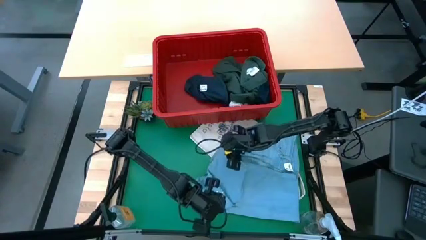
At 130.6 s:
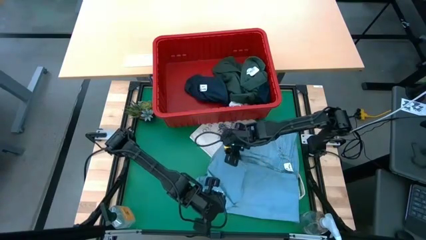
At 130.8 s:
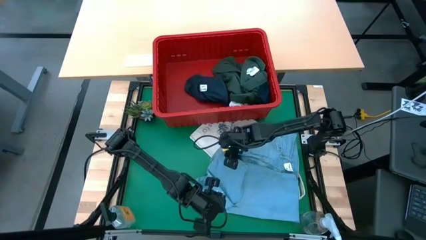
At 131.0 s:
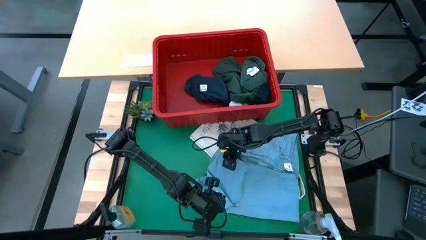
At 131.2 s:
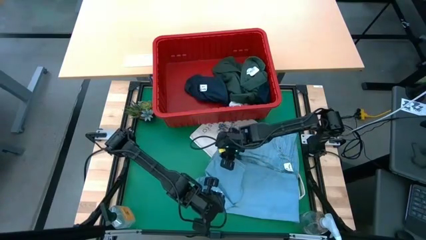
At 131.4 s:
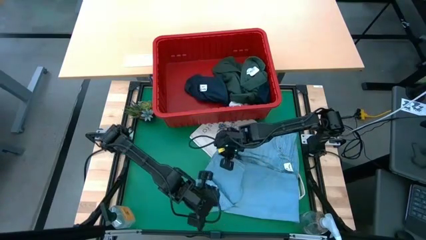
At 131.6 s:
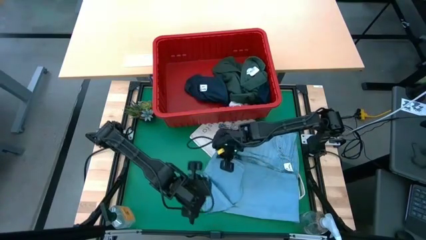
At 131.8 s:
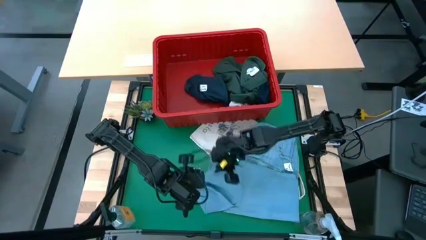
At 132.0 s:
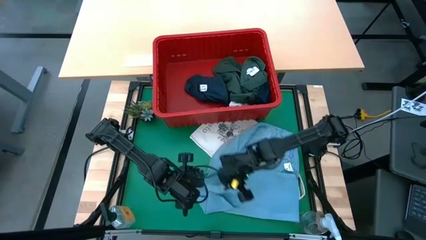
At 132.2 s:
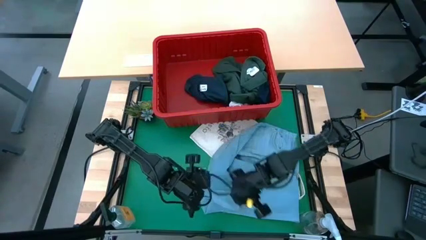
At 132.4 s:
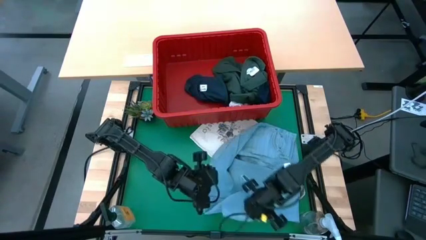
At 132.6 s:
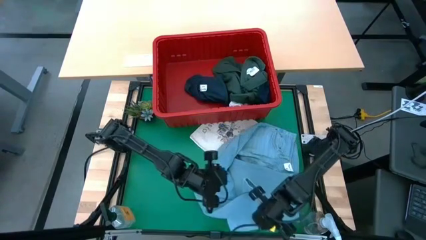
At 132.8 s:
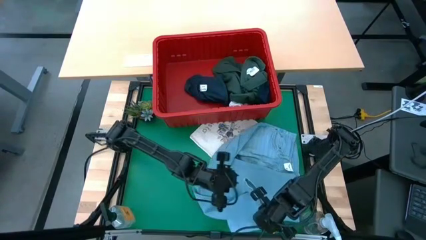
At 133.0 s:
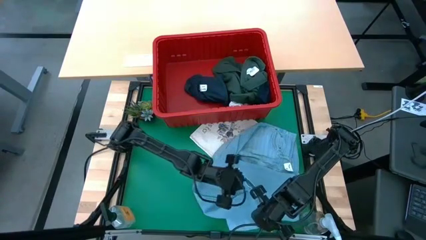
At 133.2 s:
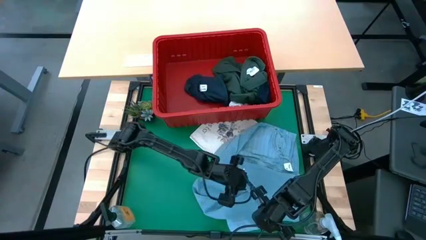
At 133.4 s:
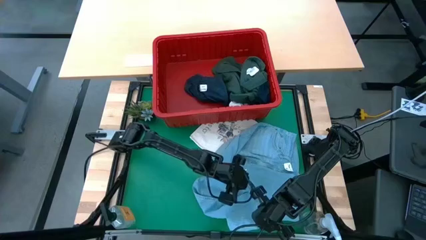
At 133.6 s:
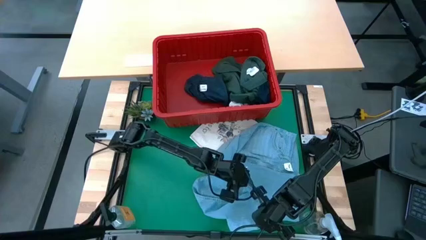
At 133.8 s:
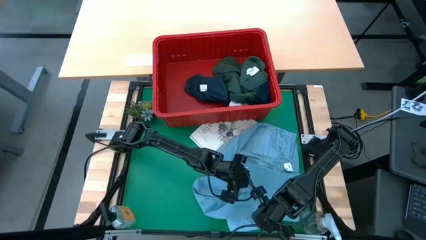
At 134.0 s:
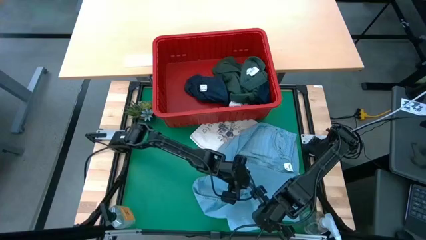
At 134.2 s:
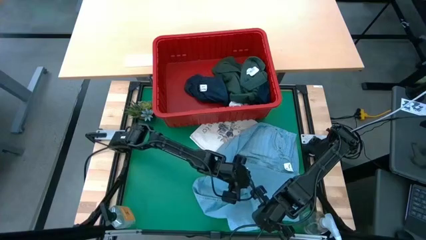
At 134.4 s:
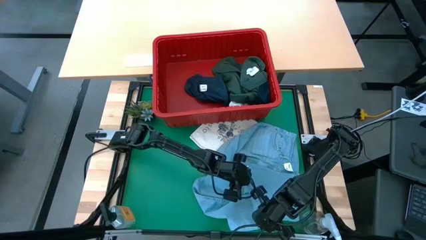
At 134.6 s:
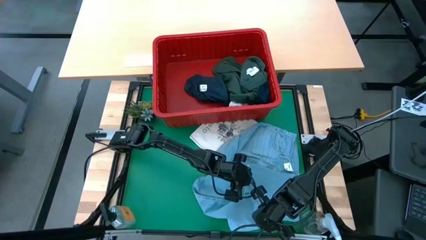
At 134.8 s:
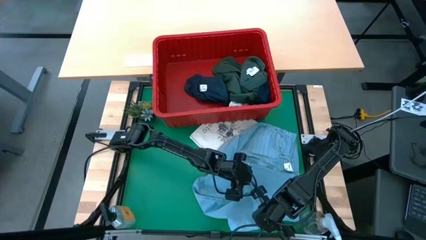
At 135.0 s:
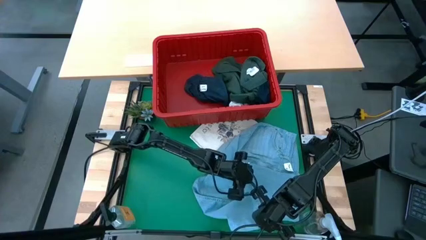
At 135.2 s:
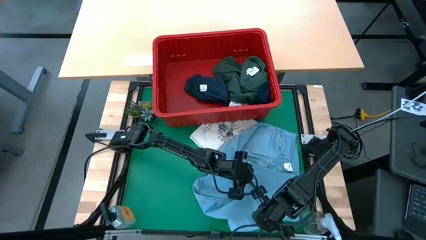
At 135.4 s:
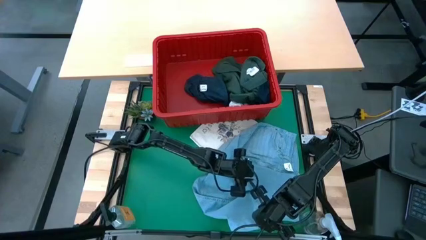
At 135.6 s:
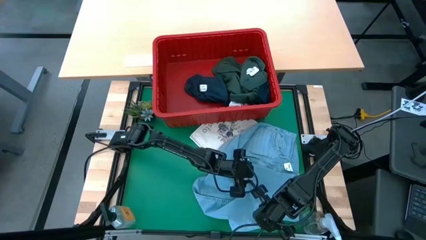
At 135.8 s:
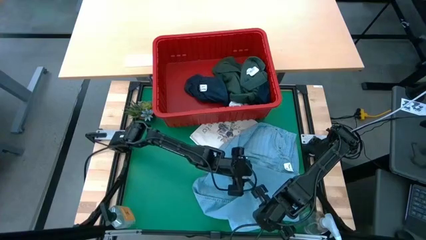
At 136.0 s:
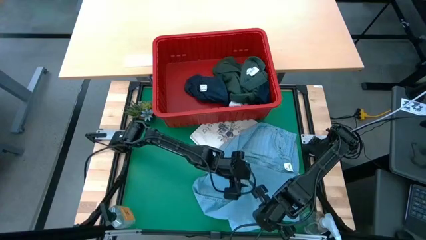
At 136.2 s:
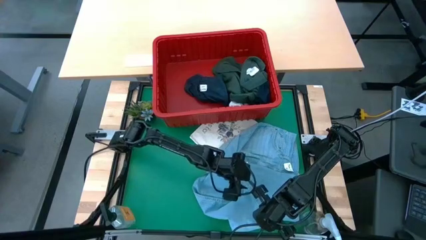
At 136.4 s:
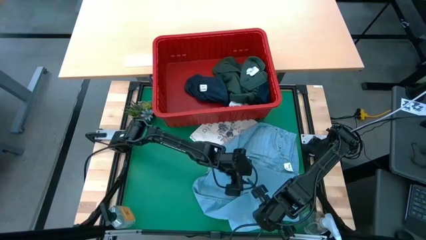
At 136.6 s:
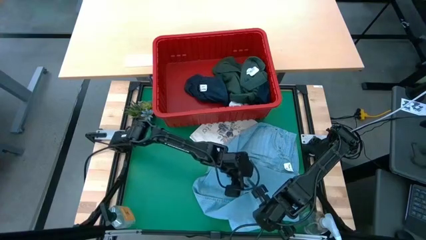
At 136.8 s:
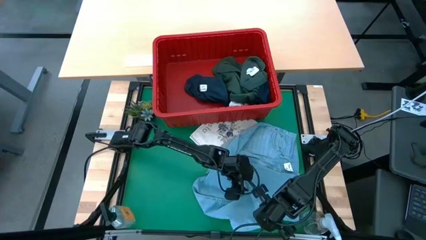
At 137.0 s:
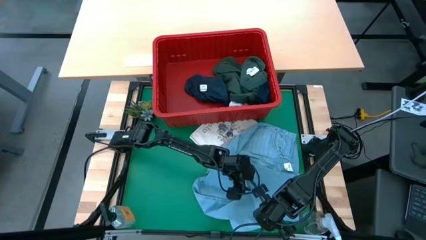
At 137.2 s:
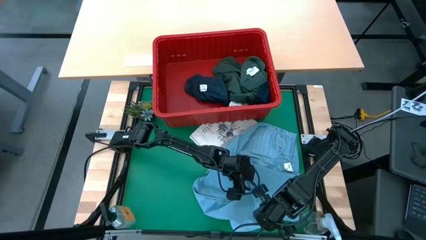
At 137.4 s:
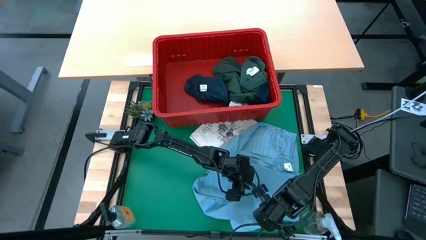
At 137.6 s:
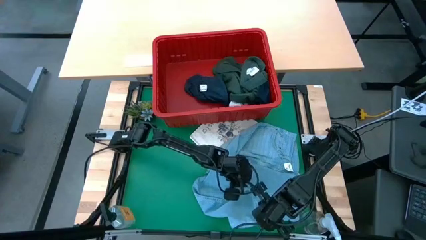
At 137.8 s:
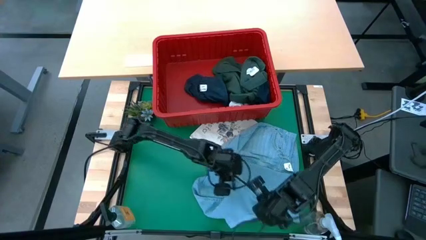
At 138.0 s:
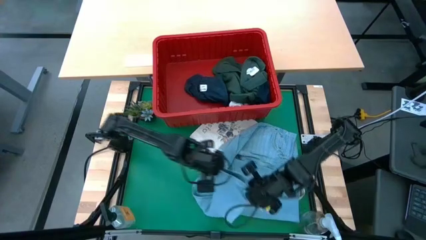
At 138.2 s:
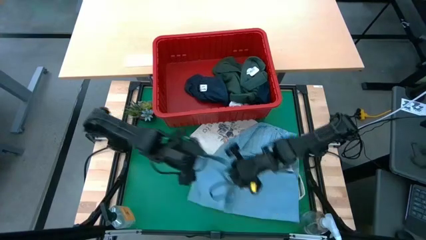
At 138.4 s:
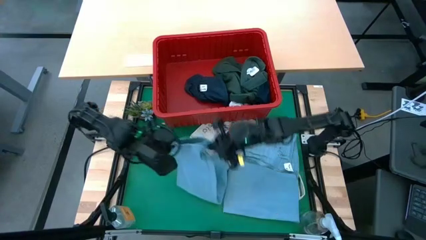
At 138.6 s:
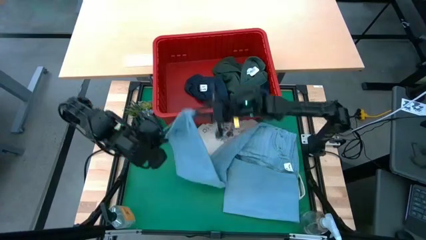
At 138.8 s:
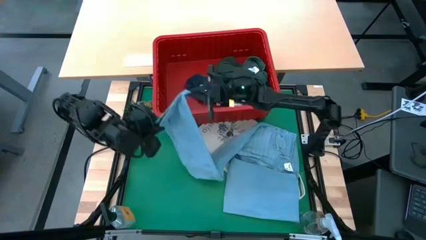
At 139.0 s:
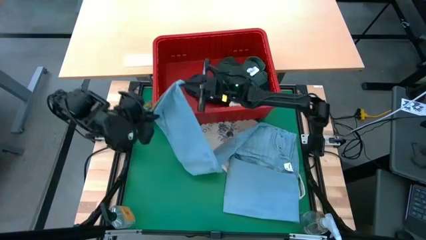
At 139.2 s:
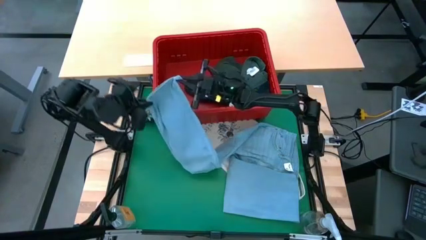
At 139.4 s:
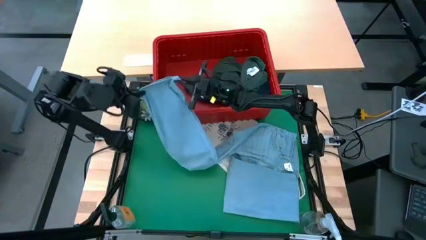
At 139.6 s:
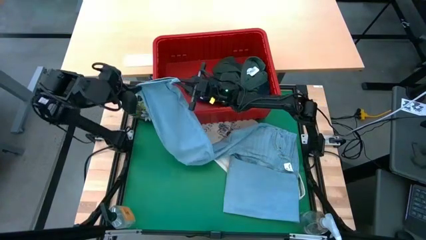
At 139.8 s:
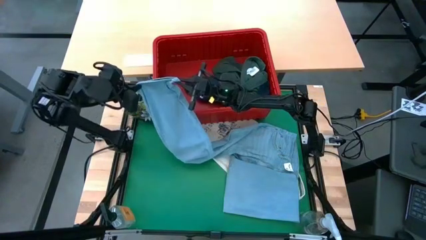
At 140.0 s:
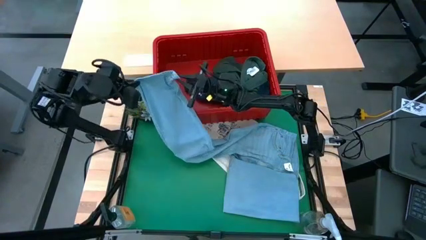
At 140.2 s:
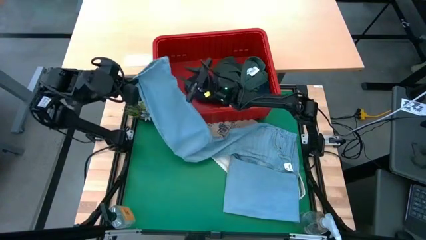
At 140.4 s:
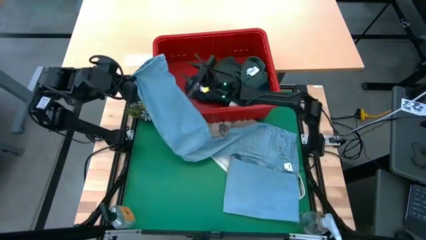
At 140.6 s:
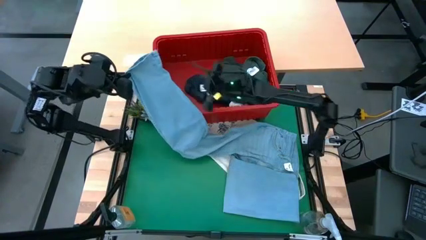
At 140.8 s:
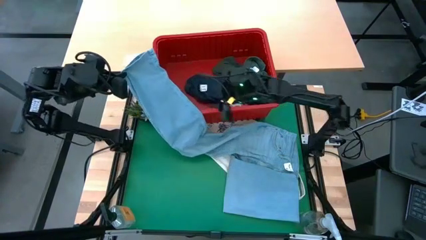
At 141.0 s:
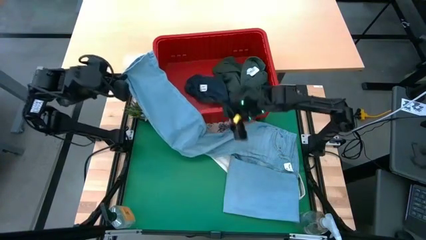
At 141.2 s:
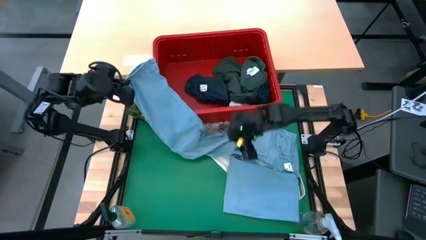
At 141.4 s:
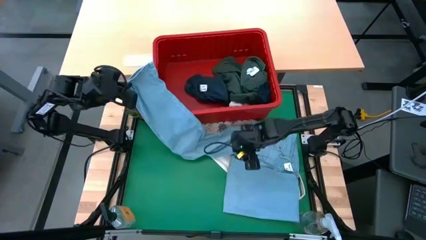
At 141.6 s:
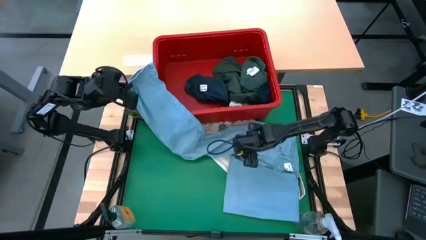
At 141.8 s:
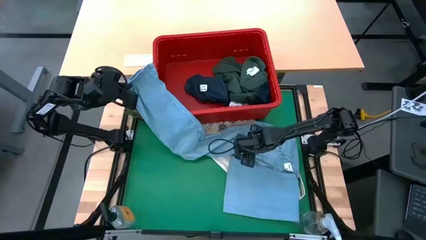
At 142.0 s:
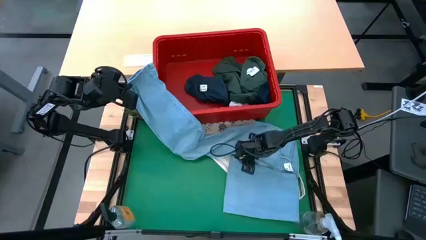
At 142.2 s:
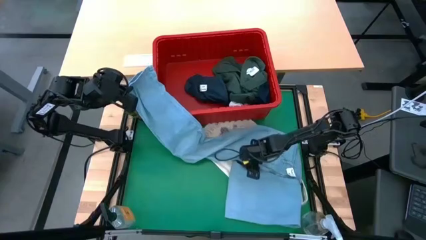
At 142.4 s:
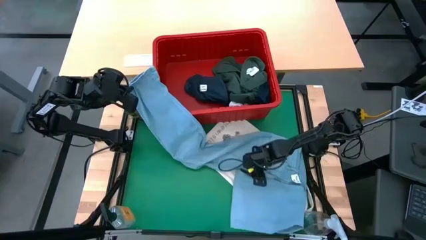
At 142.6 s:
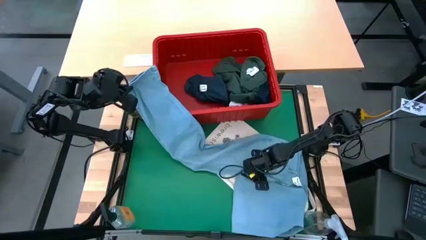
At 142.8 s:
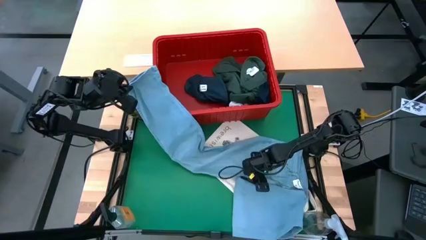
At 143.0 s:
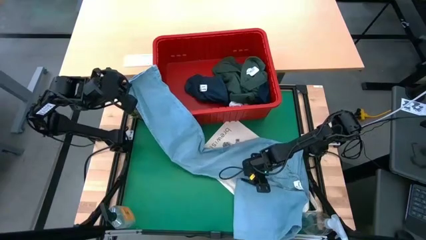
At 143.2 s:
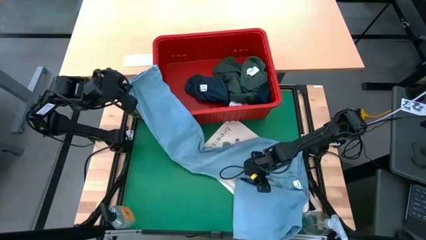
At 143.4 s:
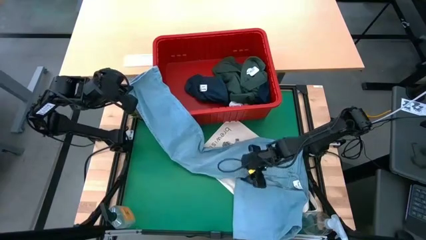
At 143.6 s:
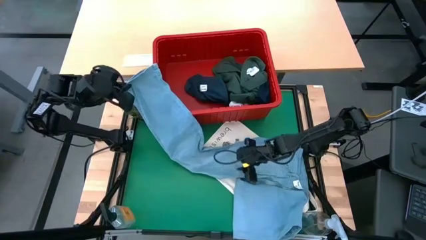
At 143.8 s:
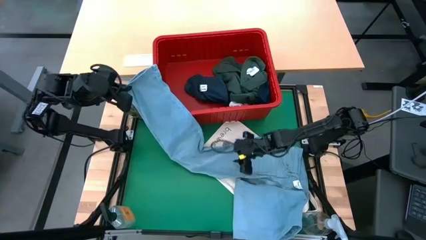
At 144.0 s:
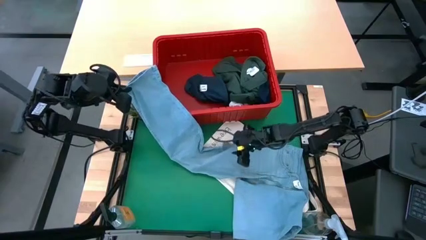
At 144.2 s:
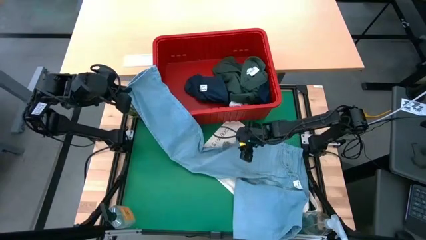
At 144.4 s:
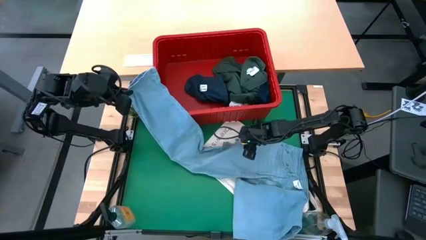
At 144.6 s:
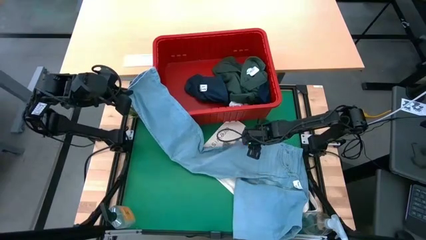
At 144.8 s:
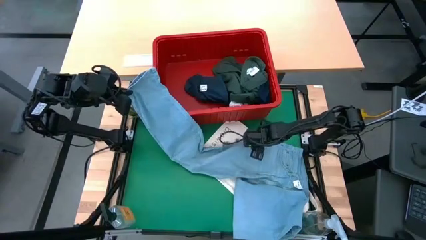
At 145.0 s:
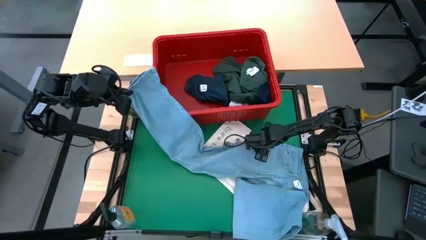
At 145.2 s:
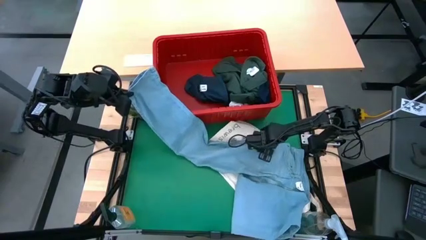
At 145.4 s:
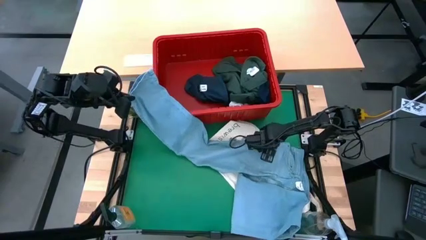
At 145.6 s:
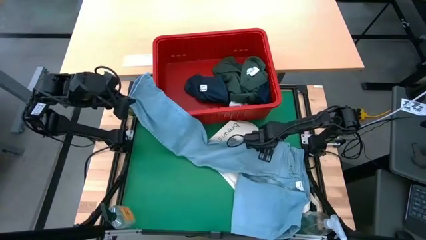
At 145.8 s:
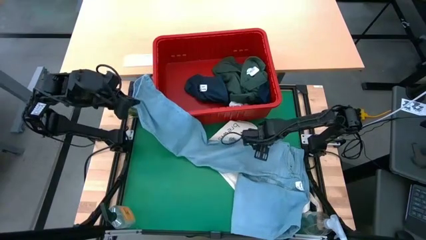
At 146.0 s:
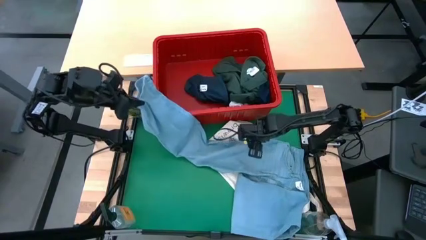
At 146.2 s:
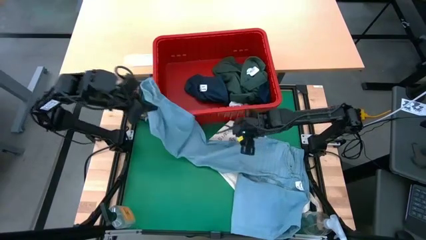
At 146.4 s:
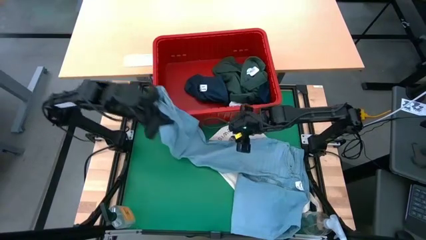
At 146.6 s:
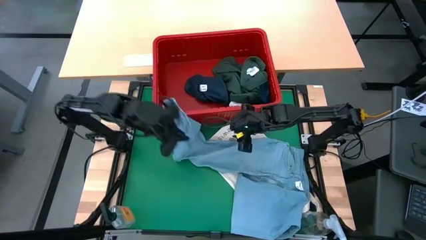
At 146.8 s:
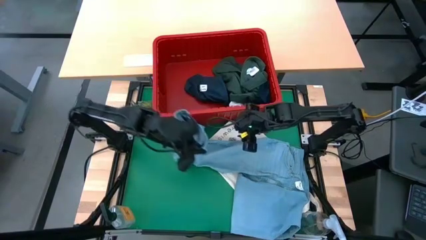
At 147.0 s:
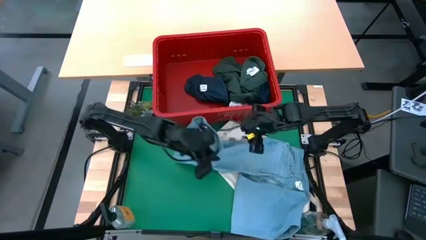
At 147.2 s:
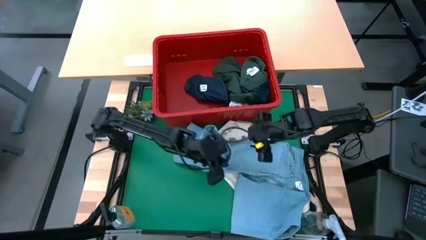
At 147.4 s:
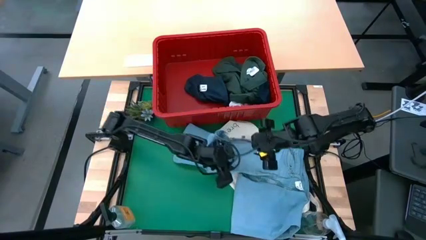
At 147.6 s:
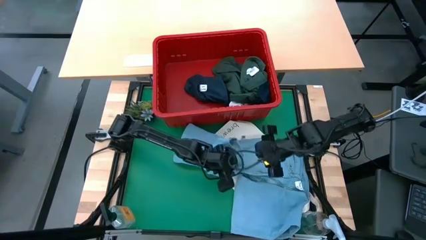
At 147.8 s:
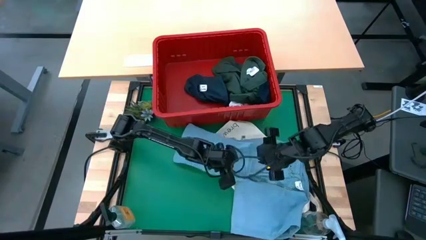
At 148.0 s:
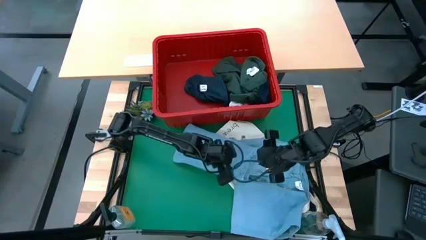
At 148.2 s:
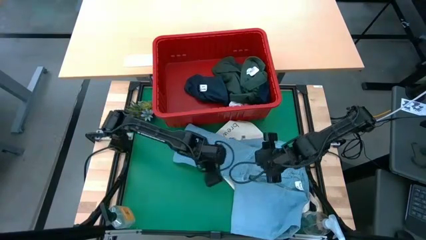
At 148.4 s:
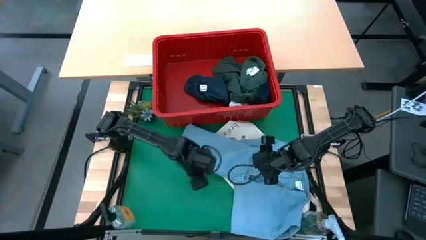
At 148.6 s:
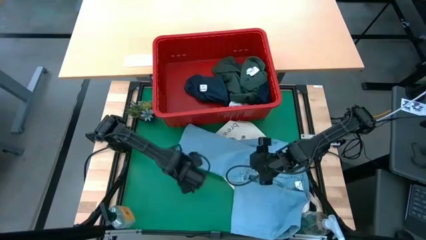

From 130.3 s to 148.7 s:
Task: Fold laundry
Fold the light blue pants
